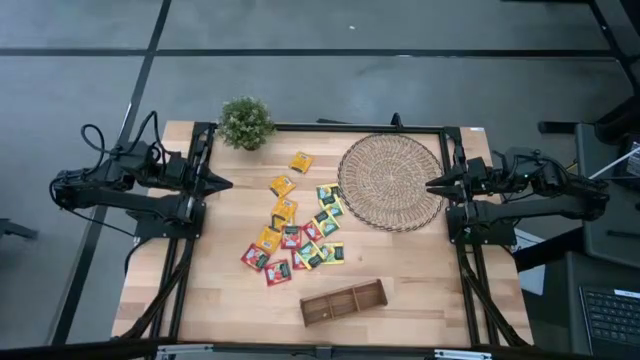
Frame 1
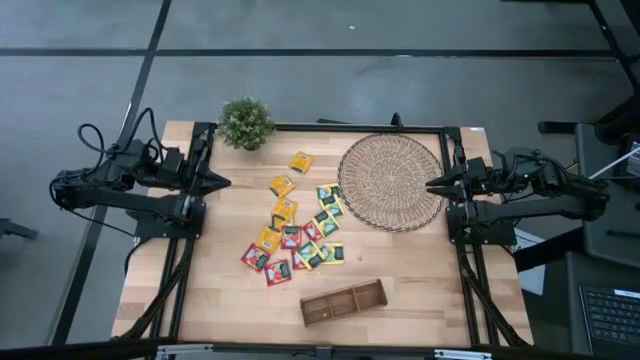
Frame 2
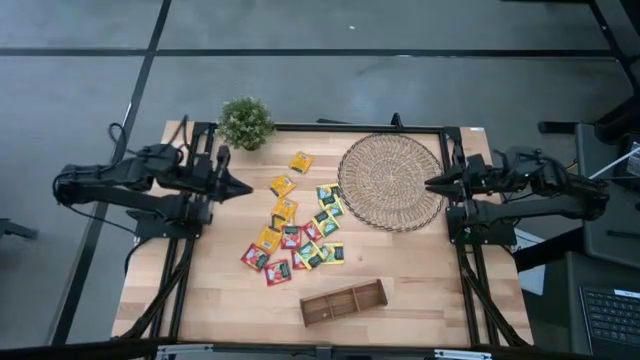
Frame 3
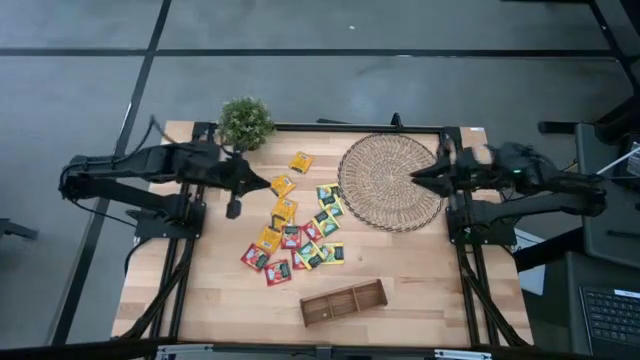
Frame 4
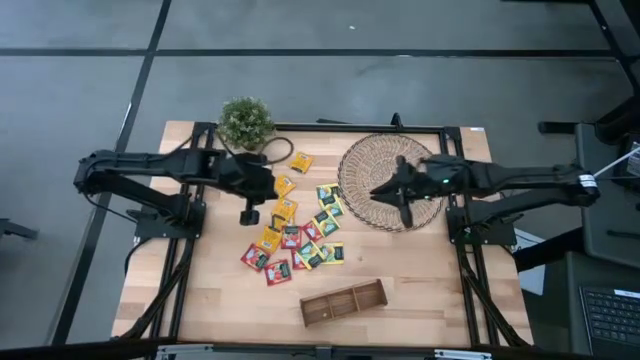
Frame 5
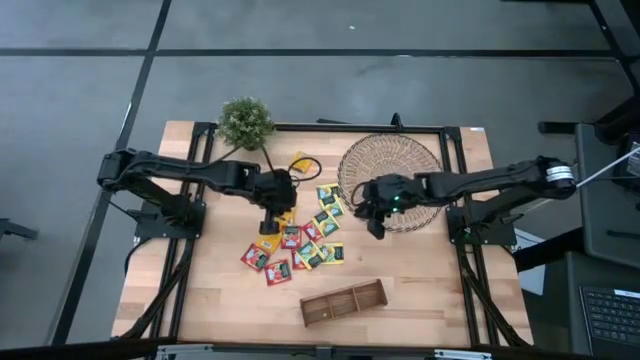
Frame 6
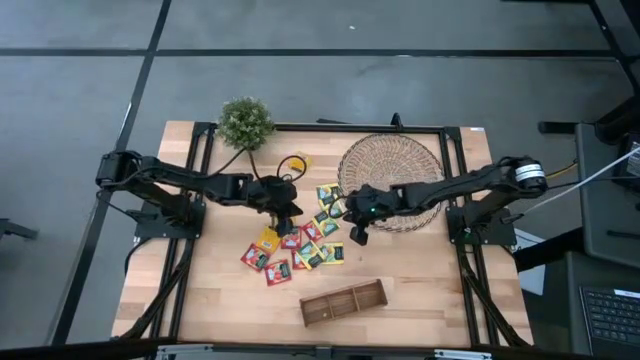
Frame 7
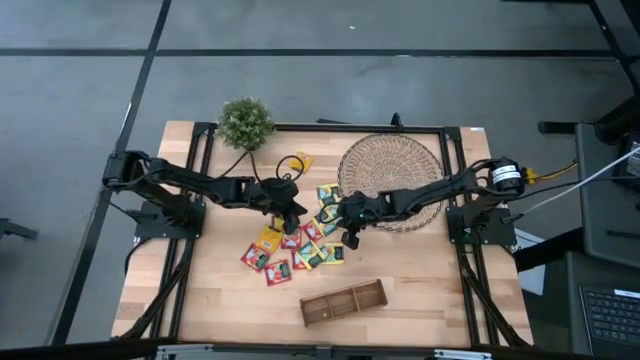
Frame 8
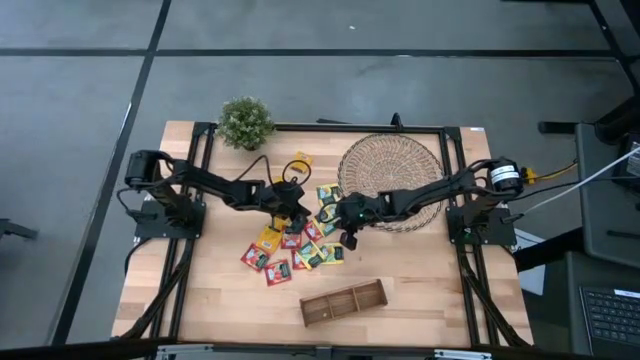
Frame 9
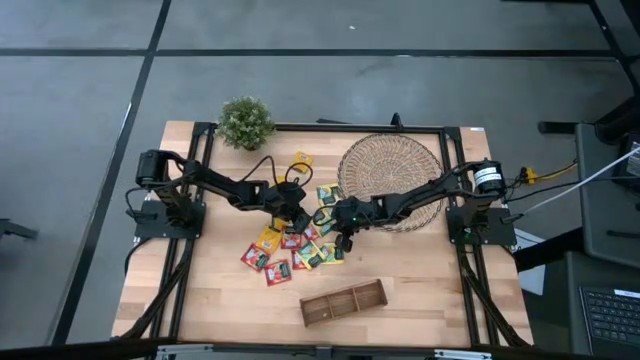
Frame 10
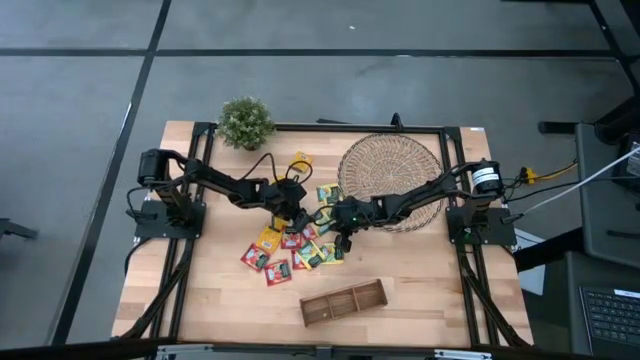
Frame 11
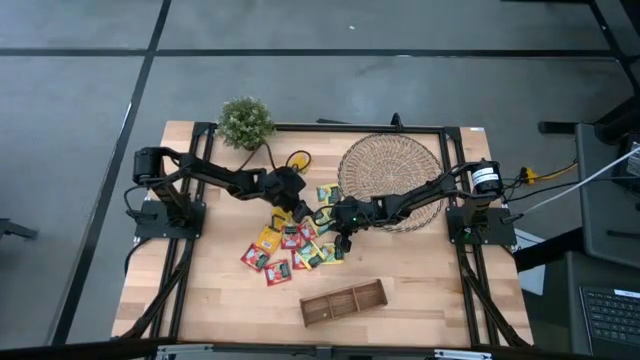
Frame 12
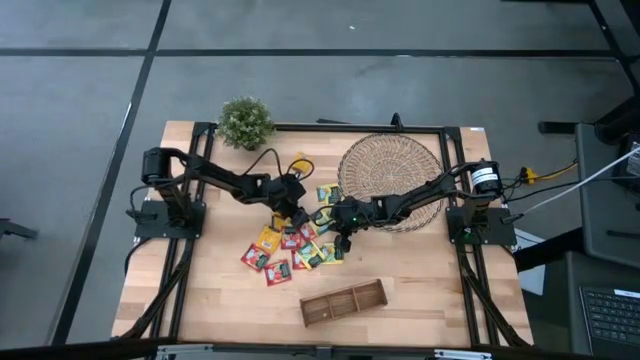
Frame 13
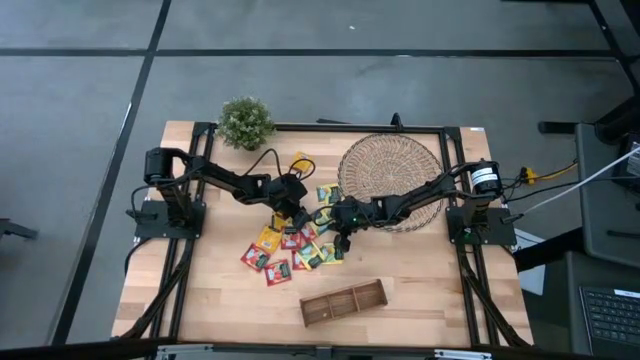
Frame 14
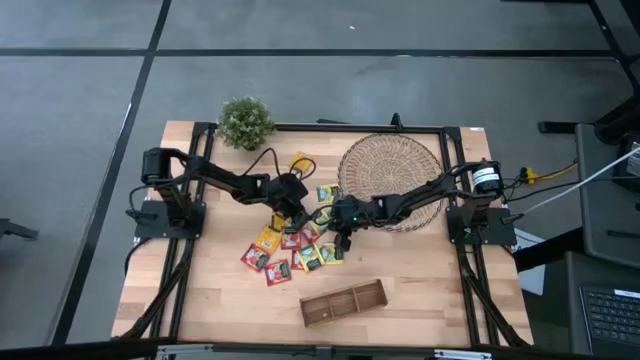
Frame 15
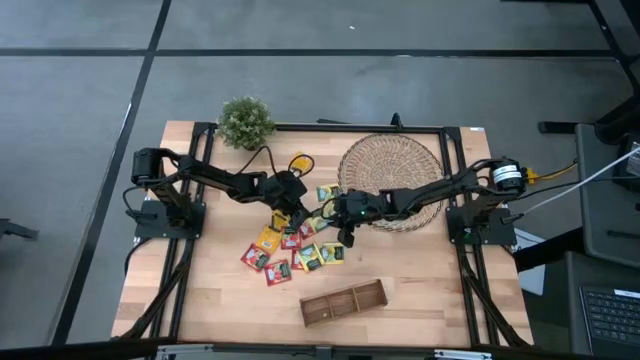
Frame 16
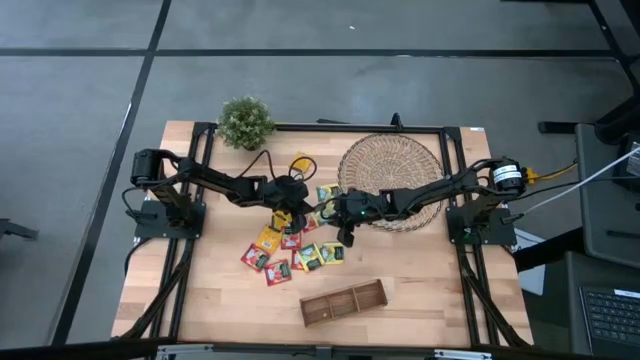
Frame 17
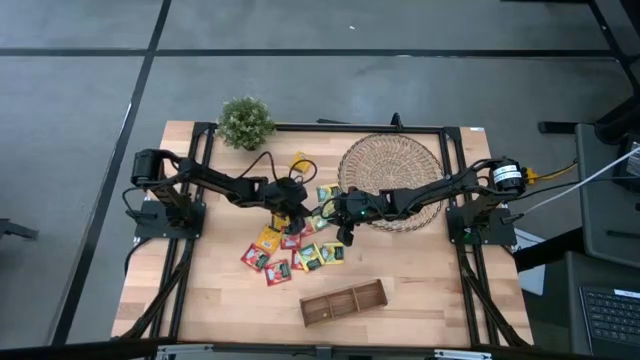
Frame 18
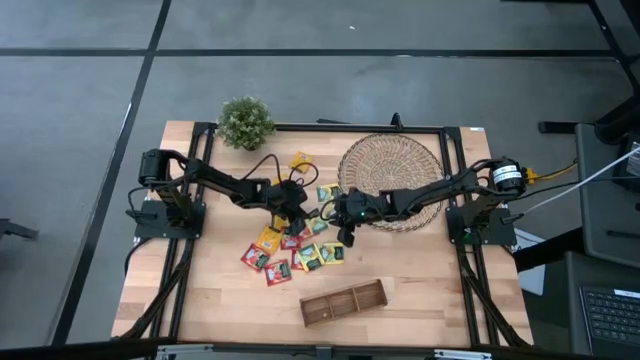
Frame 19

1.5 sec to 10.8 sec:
Task: Pick & Place Tea
Put the yellow tea bag into the middle slot of the wooden organizer

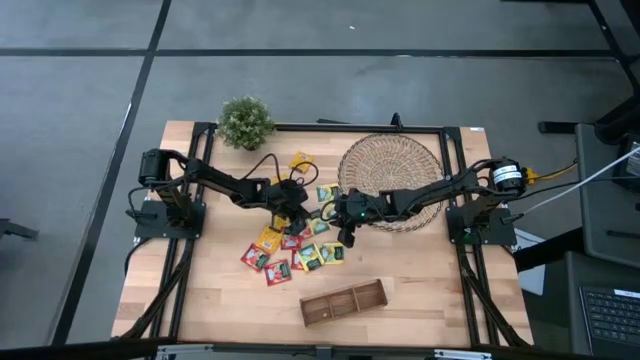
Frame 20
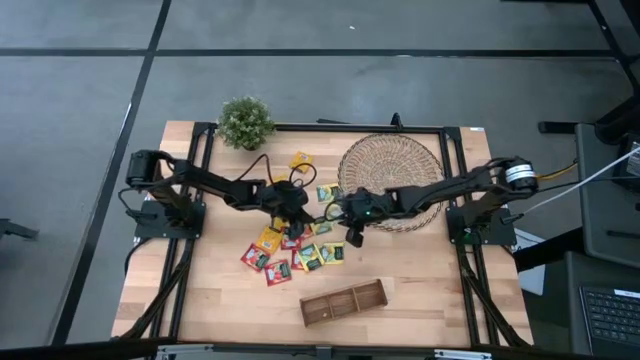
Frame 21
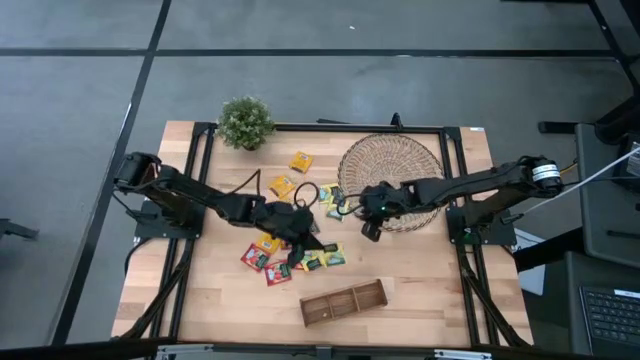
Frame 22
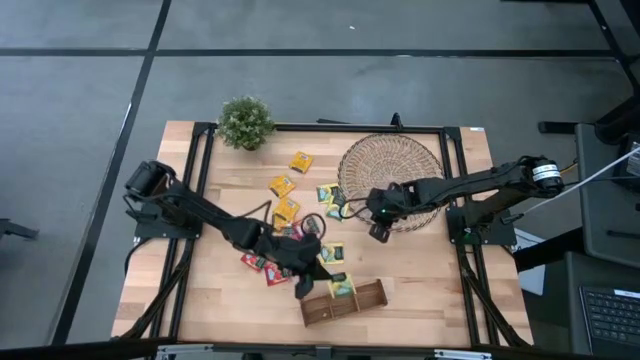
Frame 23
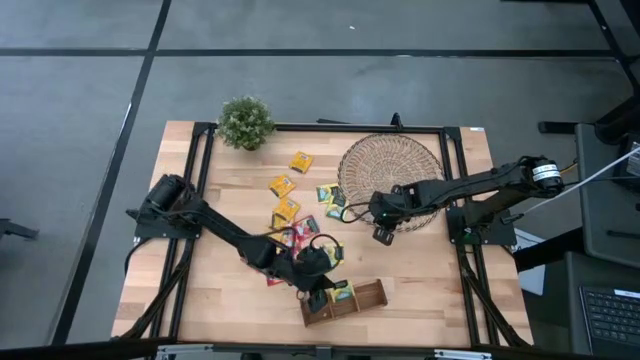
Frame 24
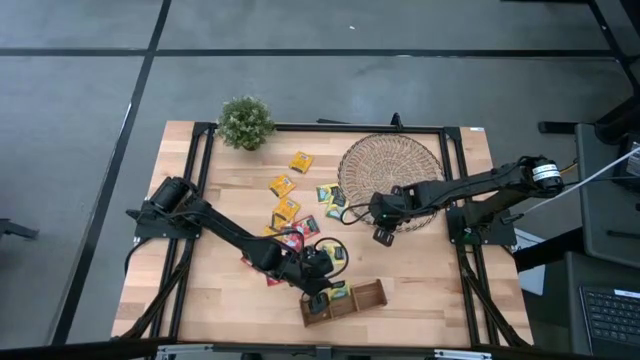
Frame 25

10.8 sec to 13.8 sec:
Put the yellow tea bag into the middle slot of the wooden organizer

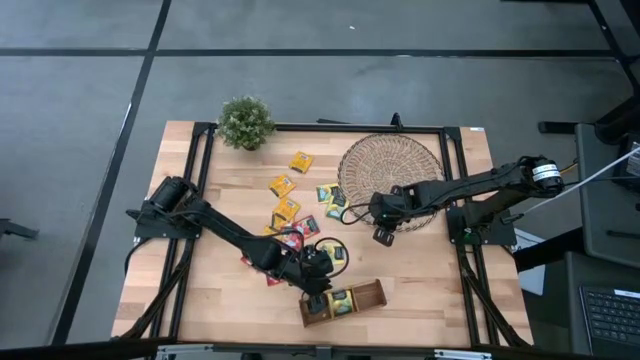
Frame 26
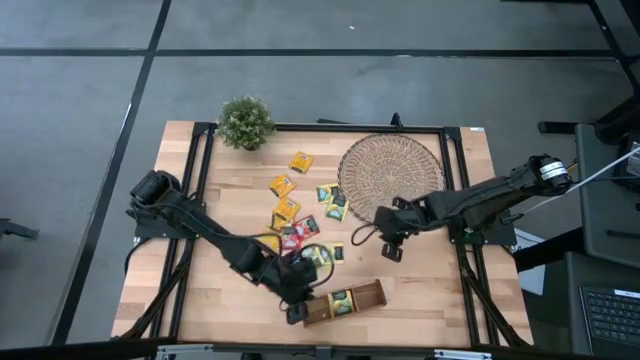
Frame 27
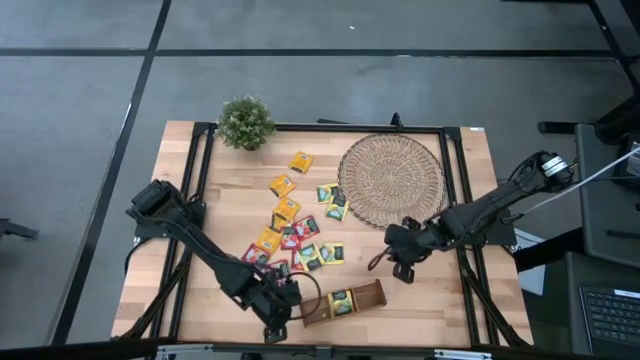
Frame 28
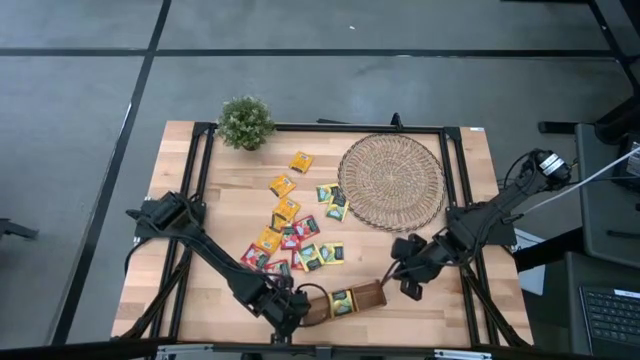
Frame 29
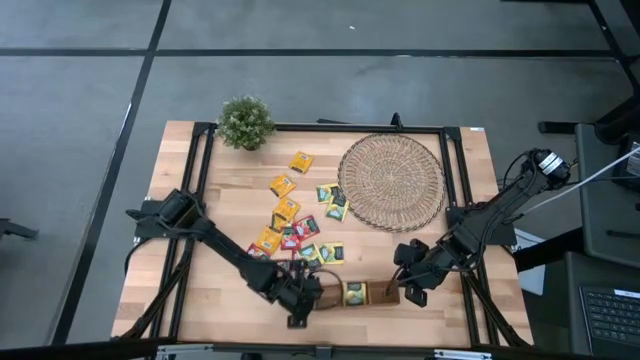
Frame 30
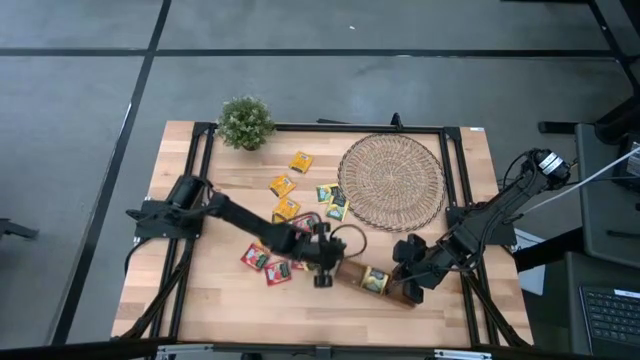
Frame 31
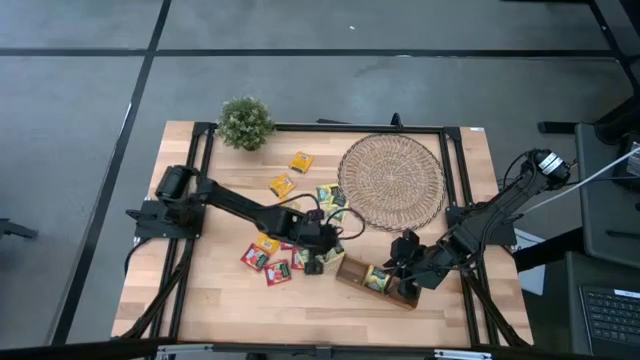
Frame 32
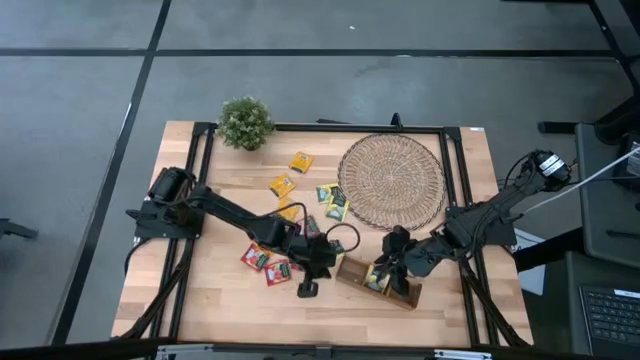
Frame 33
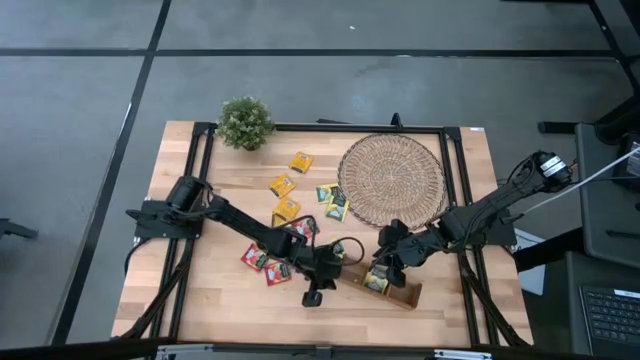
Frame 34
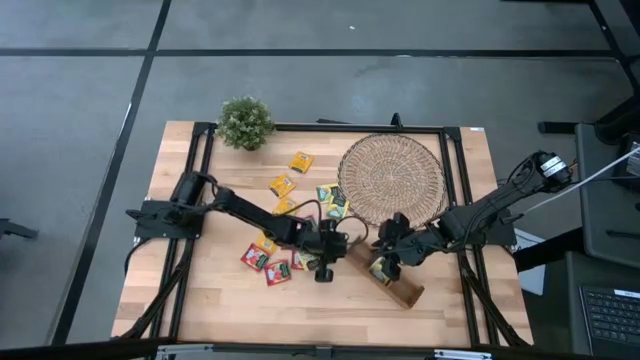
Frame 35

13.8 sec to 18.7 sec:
Move the wooden organizer to the middle right of the table

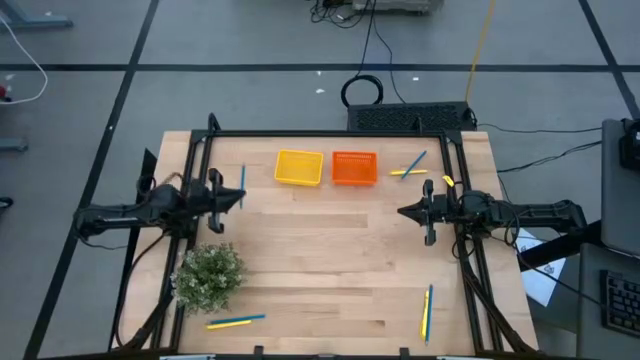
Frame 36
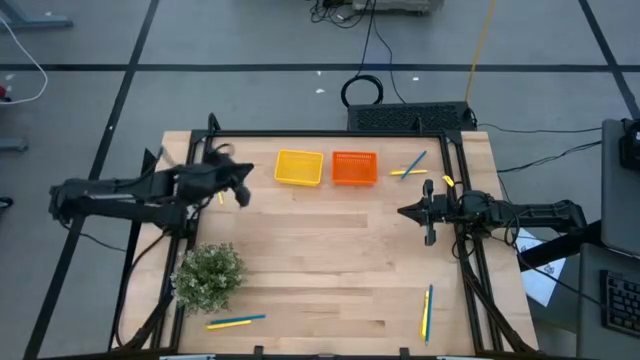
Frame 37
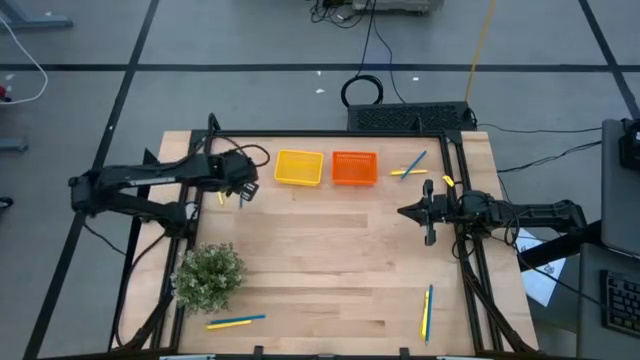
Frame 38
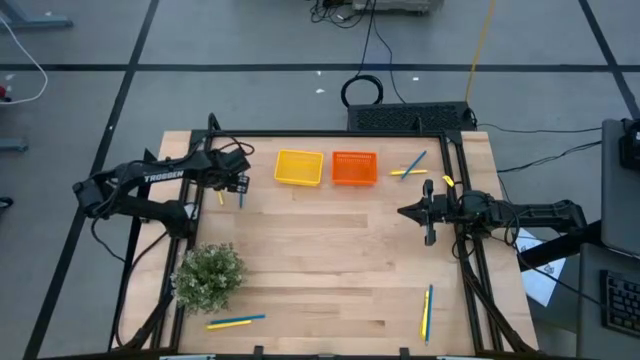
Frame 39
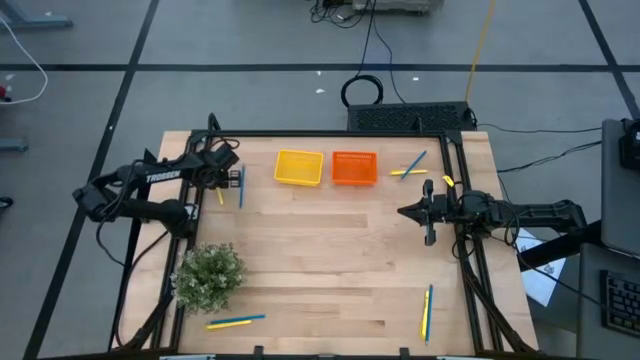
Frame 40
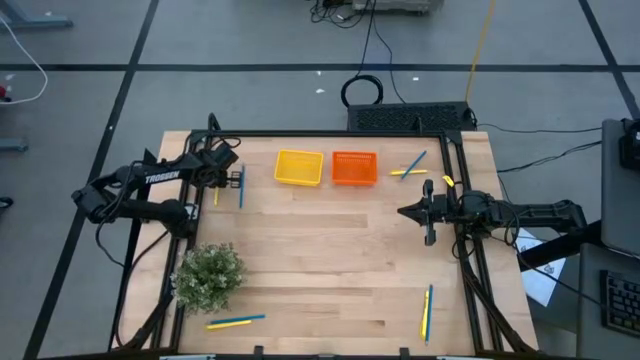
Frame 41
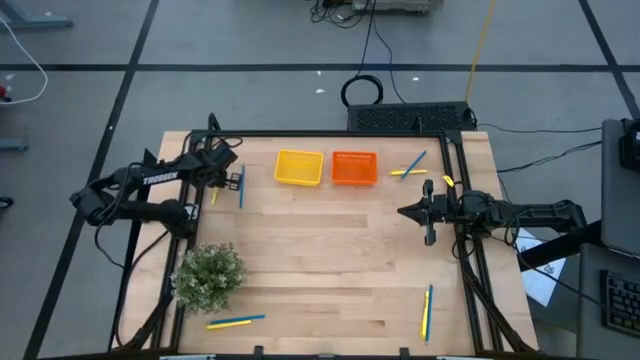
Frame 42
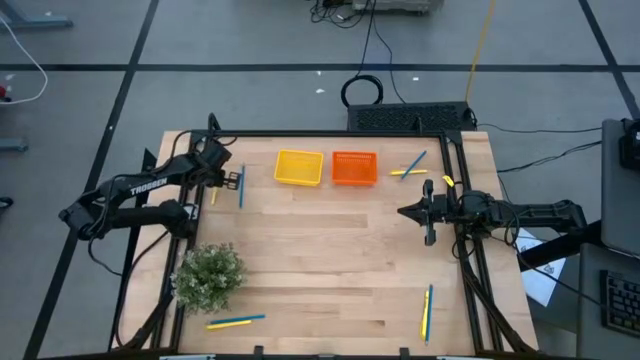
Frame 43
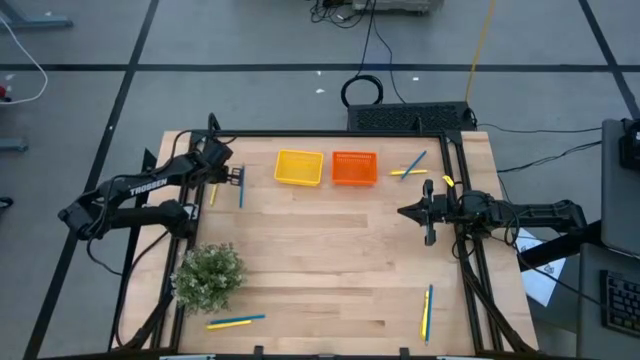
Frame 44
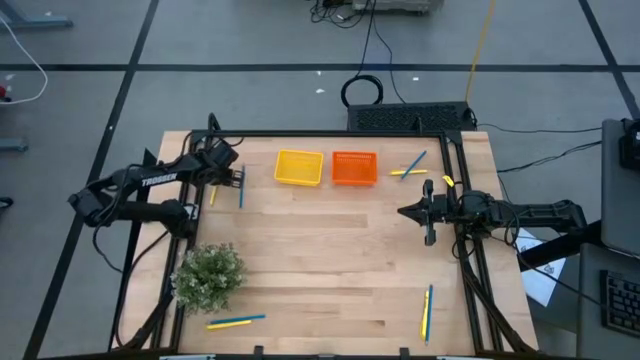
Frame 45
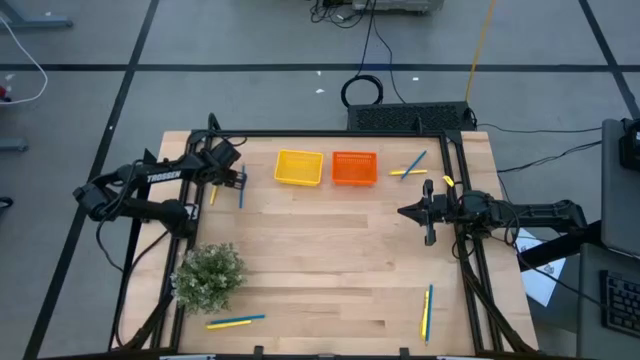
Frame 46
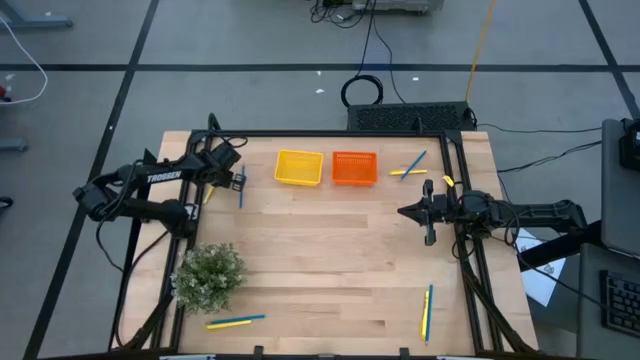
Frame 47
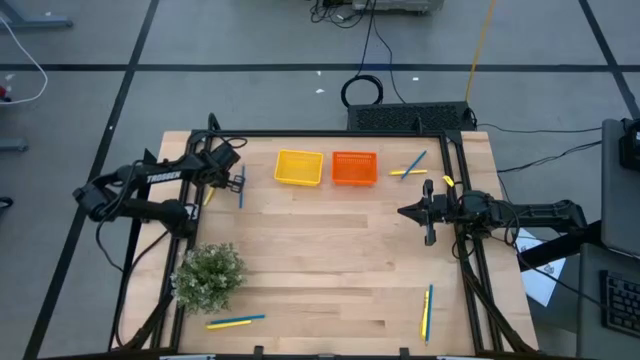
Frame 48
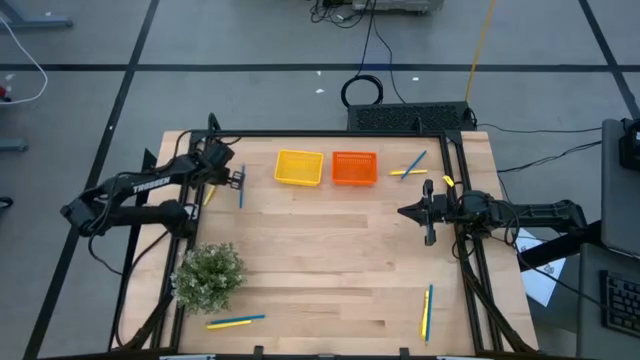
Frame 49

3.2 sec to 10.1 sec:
Task: Sort pens & pencils
Put the top left yellow pen into the yellow bin
